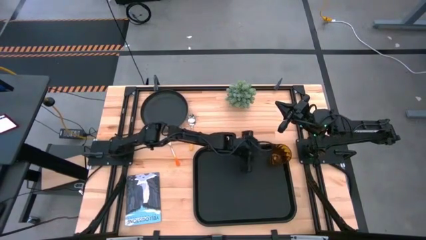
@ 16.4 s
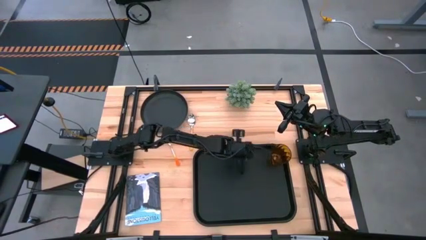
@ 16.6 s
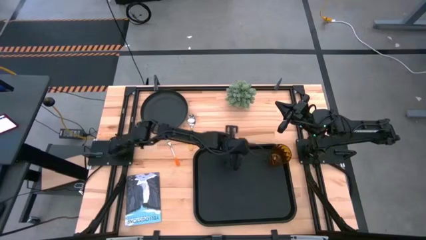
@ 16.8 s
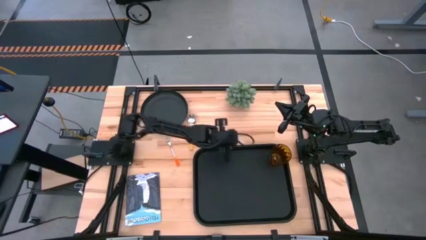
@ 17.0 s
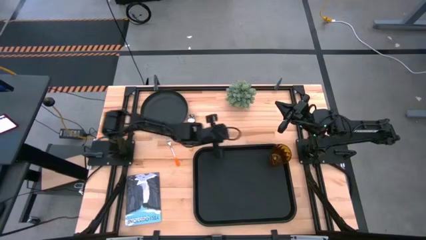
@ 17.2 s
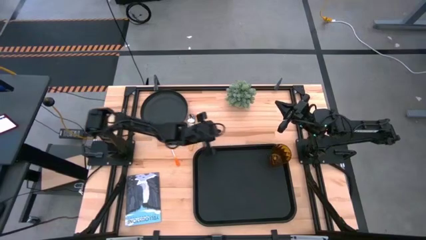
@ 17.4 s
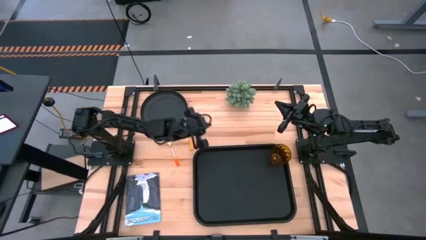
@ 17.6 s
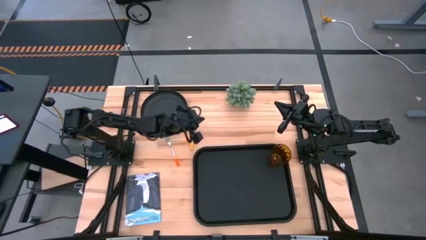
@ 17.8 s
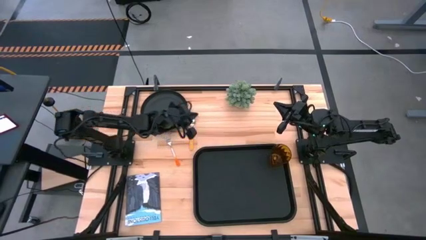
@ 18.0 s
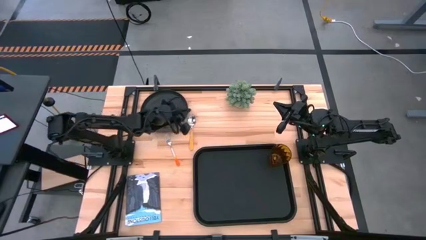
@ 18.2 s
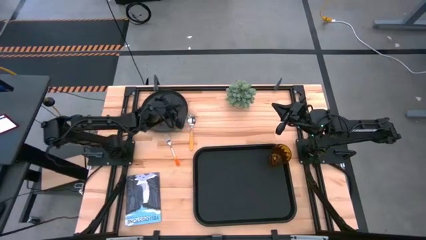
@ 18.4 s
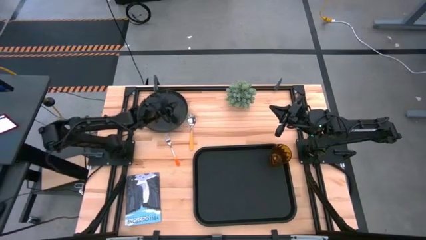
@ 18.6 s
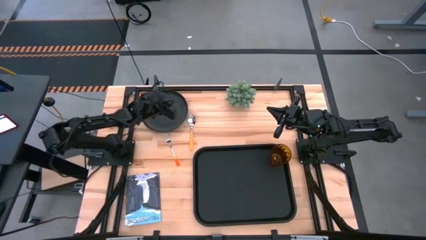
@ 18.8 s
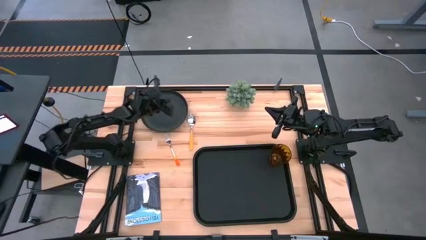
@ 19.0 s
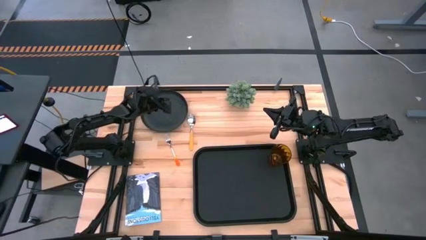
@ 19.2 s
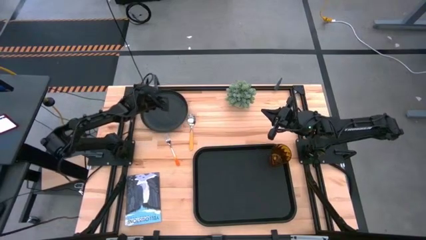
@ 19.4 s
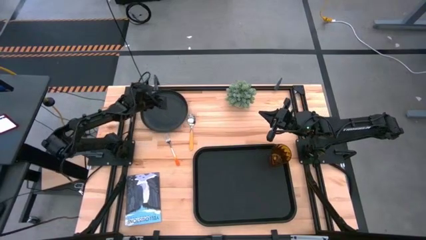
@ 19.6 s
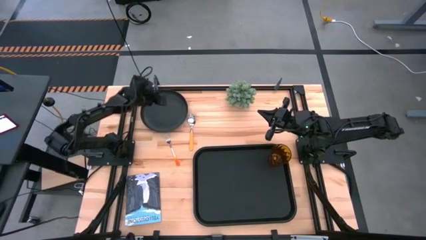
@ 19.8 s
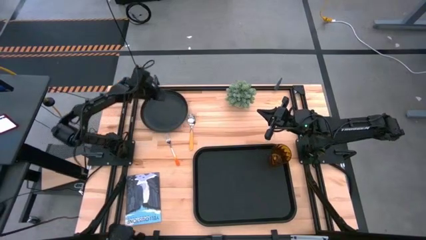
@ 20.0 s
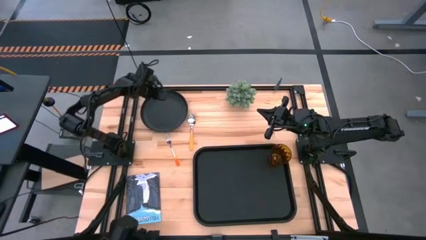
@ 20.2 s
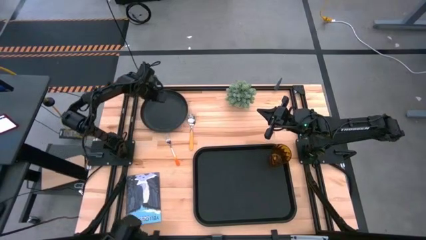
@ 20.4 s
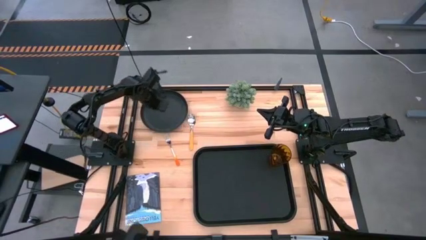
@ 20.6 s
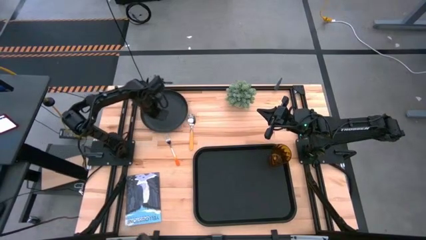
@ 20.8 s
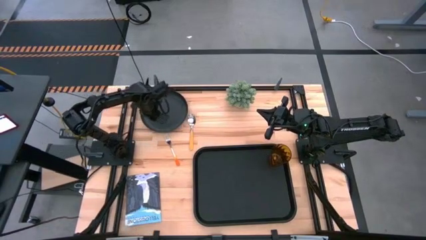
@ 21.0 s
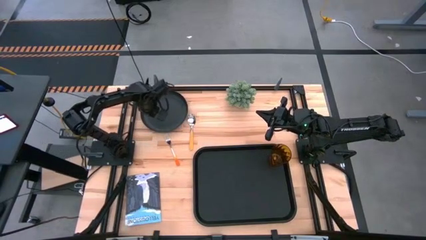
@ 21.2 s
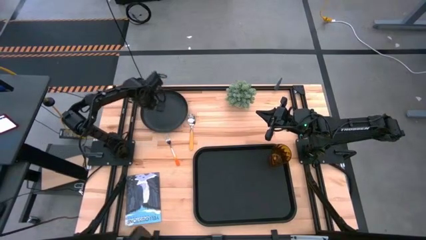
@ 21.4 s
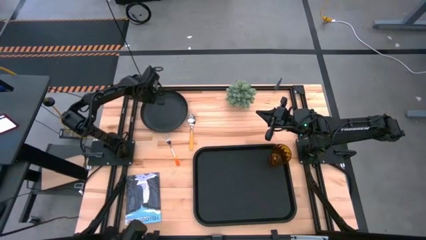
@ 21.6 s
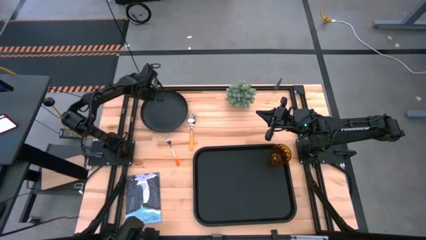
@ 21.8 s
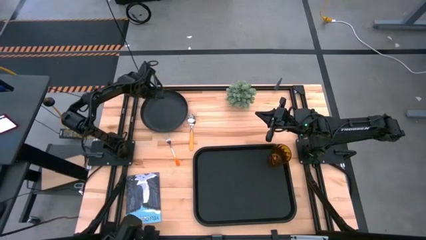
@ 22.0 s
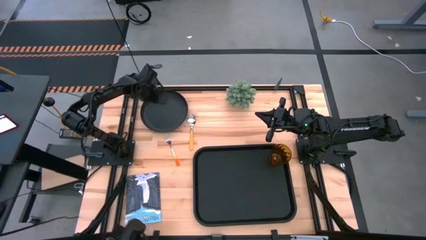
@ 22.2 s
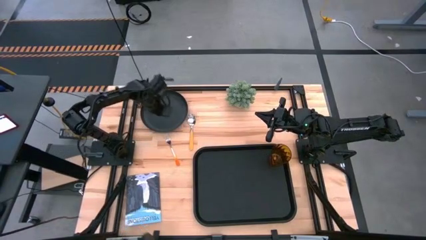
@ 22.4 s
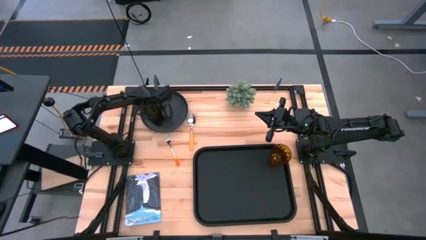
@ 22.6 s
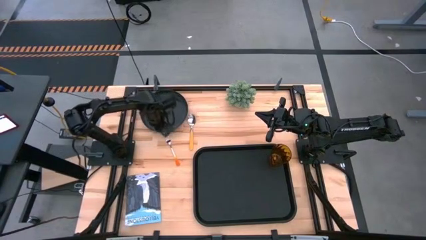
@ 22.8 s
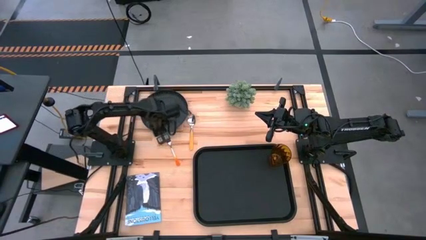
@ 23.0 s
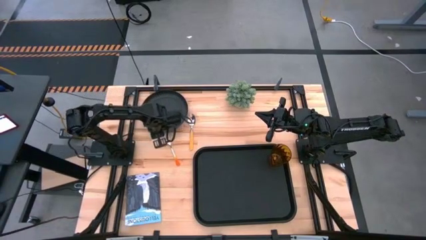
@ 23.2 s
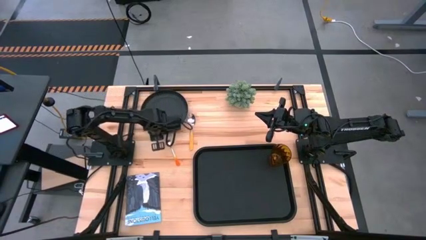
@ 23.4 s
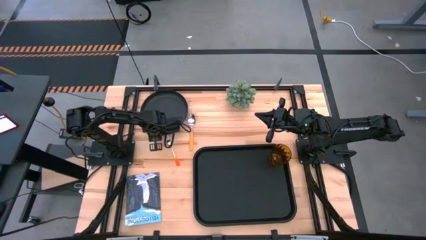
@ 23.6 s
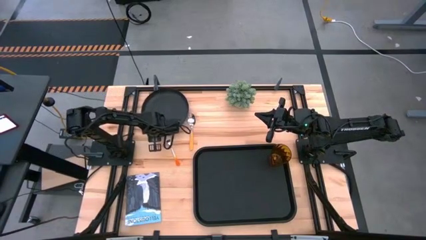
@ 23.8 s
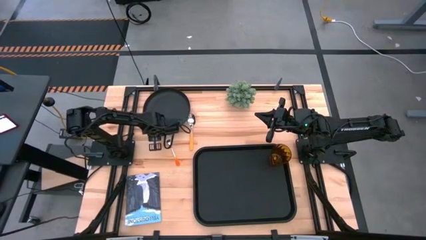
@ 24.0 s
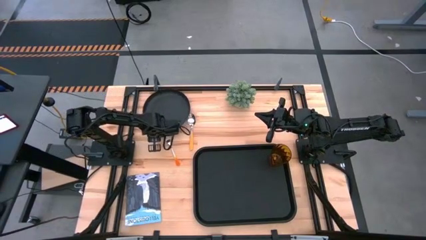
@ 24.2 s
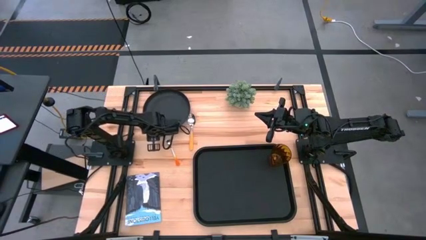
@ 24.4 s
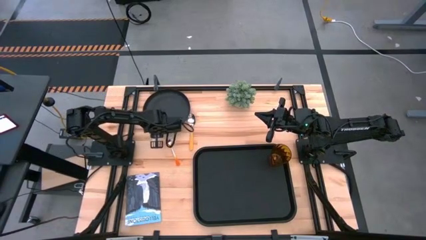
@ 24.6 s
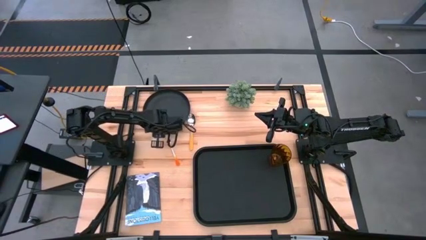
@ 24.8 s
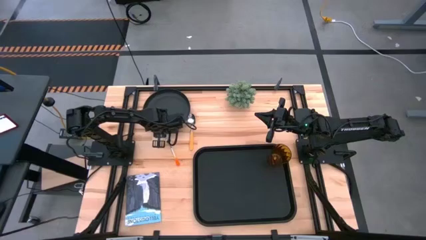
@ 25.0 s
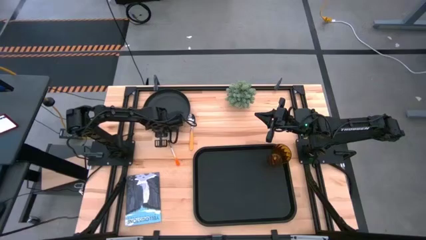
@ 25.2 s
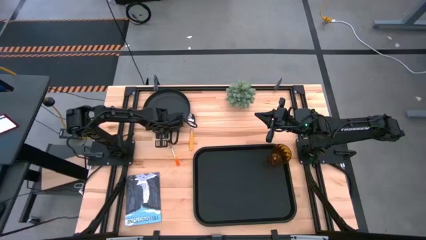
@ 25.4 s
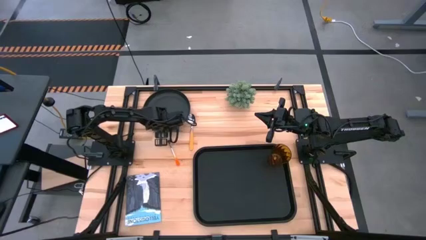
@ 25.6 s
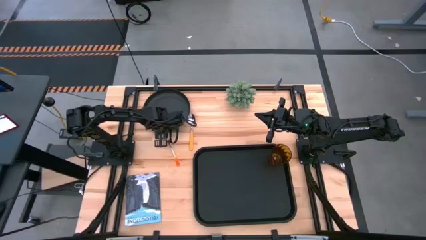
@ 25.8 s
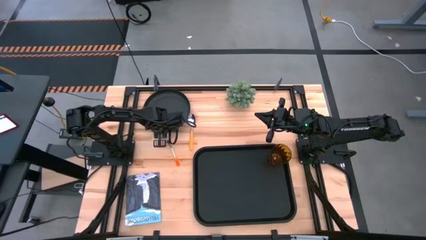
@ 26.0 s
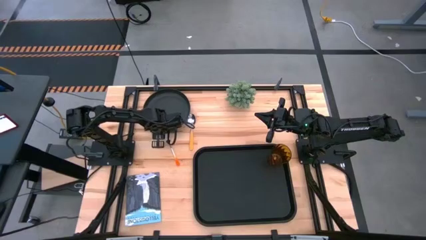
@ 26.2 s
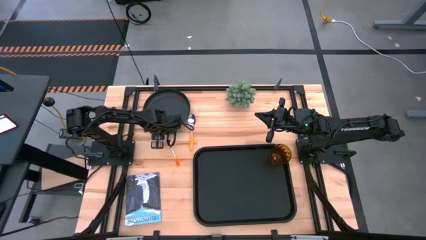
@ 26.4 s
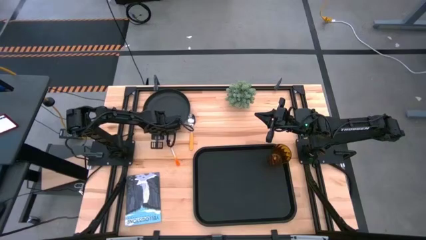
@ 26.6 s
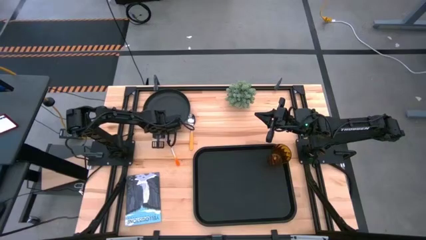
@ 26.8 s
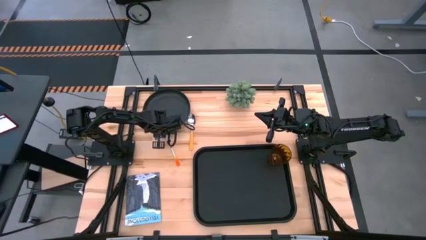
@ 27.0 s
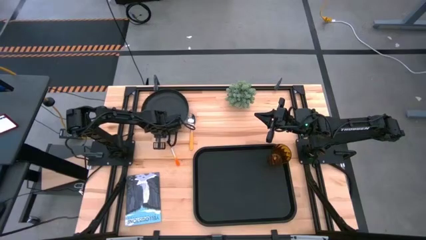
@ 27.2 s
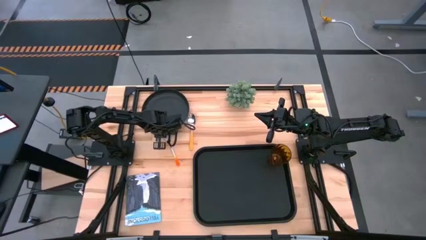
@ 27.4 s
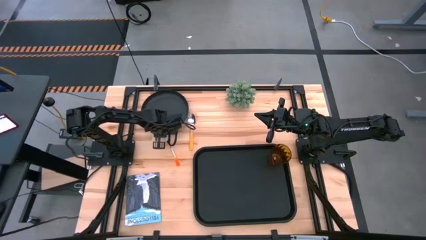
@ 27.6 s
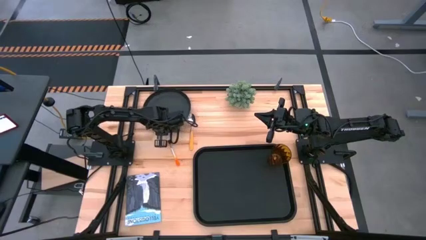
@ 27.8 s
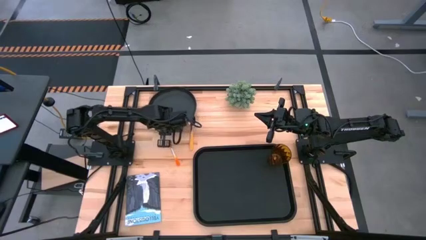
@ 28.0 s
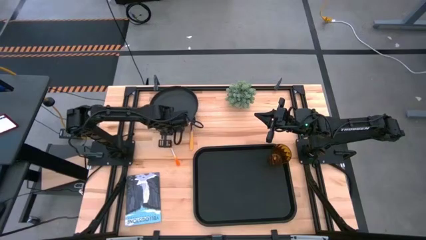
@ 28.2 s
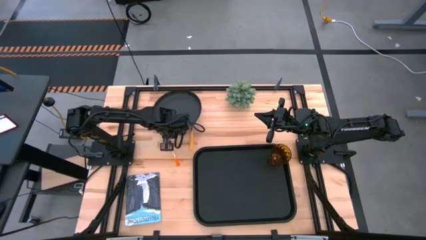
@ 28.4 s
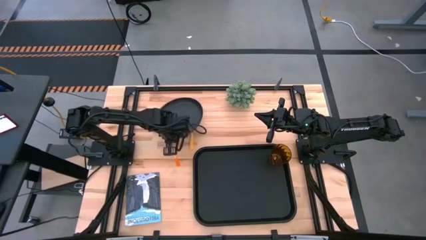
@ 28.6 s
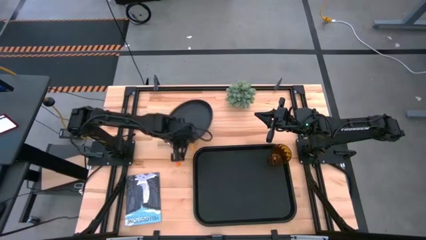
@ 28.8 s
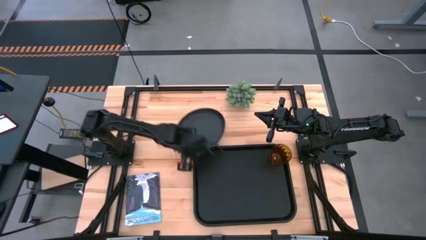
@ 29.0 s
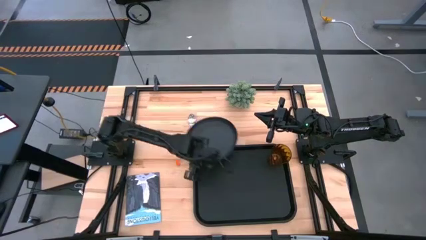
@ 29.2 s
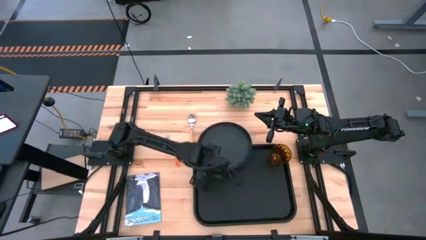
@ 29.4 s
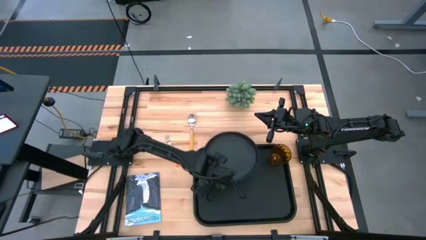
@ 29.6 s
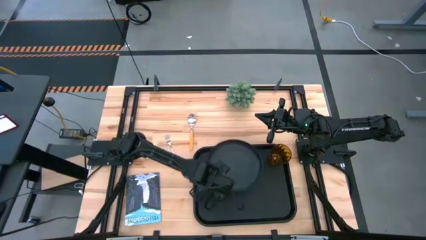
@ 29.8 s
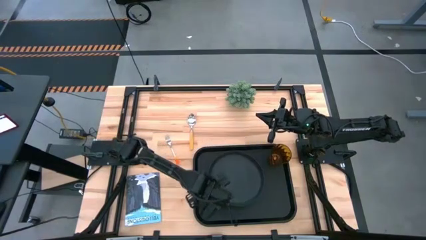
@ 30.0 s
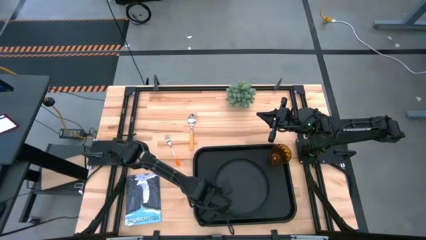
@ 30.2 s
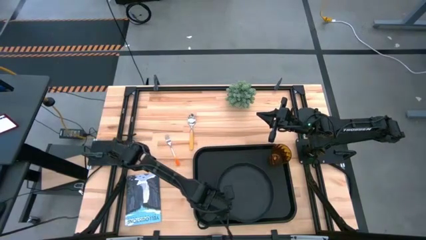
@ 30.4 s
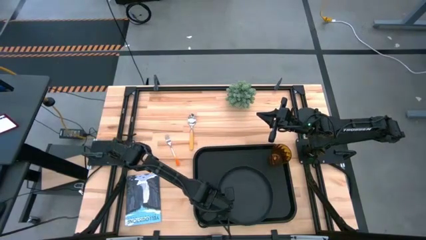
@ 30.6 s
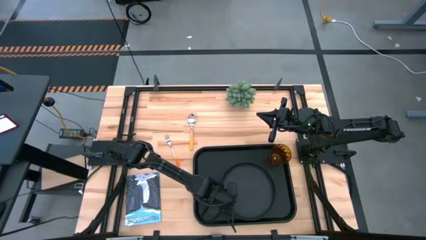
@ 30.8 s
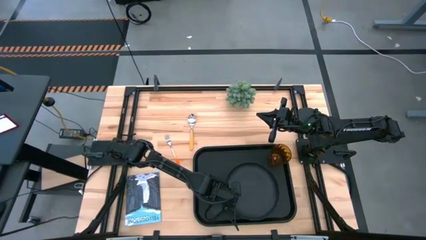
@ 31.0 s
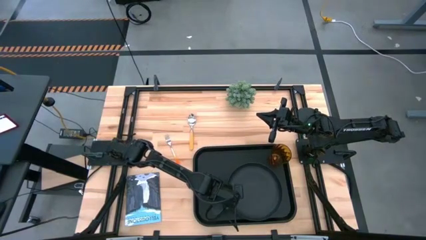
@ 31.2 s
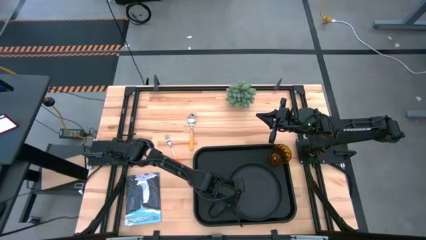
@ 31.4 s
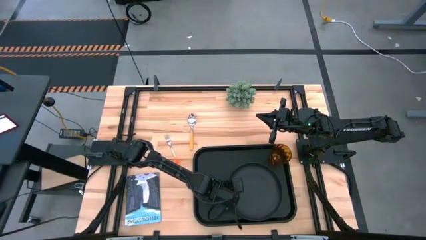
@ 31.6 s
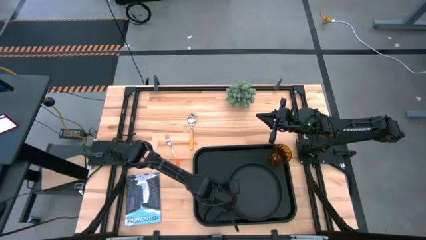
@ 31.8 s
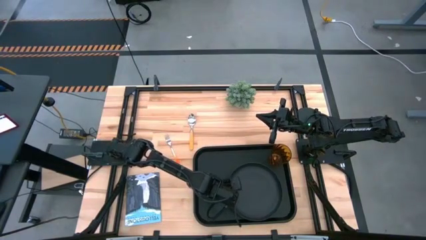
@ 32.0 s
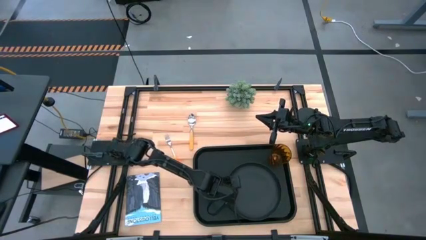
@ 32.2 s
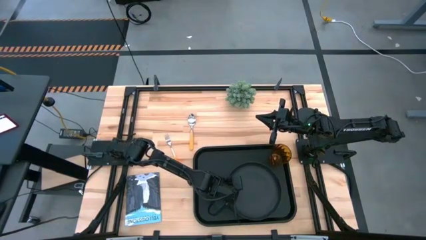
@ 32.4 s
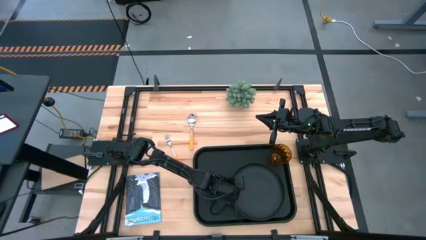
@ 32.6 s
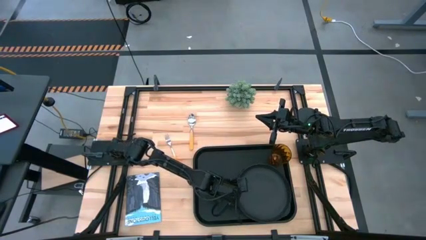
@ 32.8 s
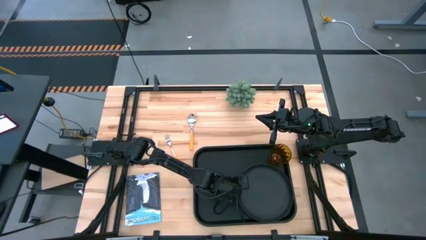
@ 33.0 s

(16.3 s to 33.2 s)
Task: Pick and place plate/cup/fork/spoon on tray
Put the black plate on the black serving tray to the bottom left of the brown glass cup
